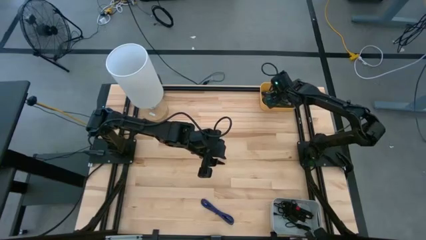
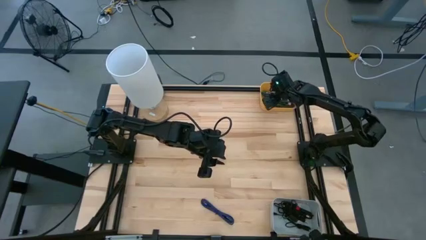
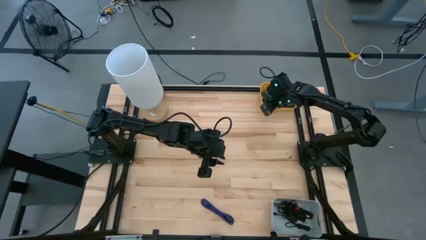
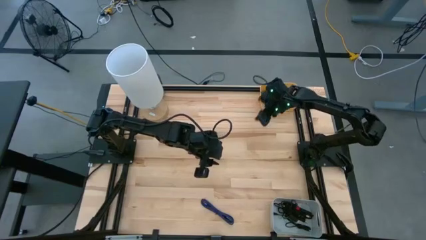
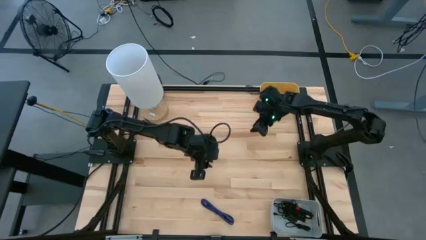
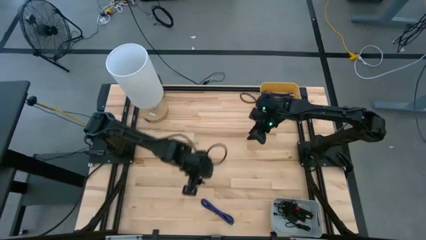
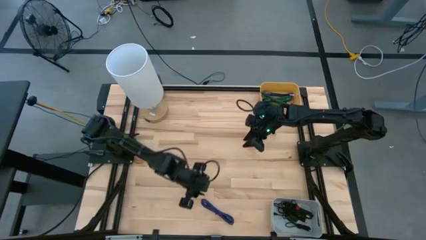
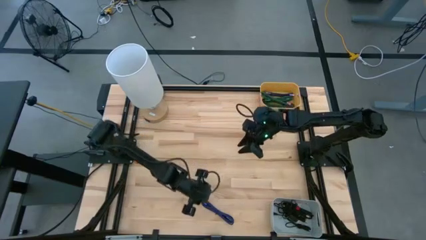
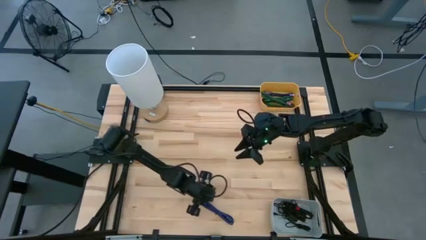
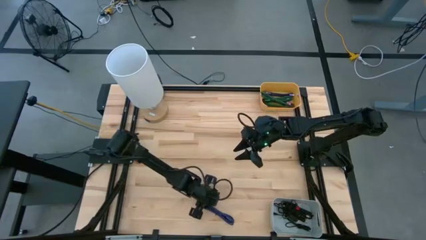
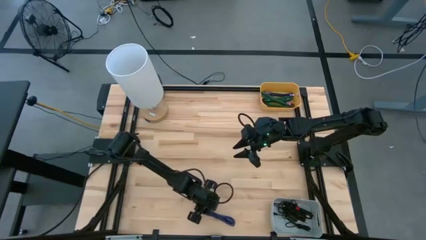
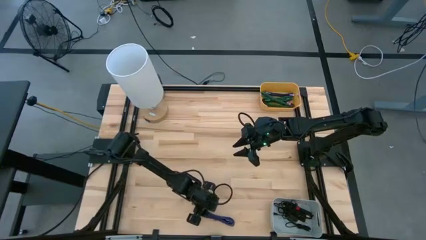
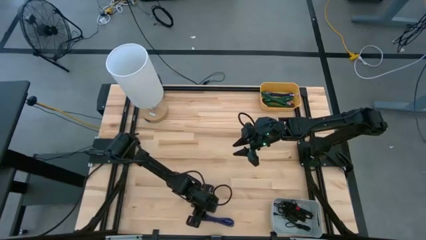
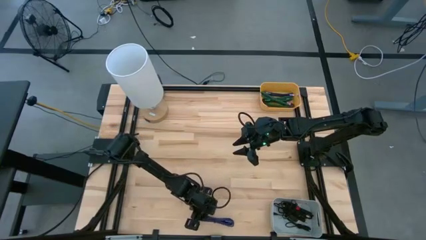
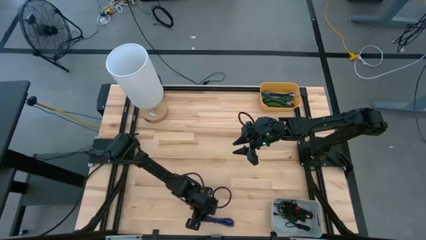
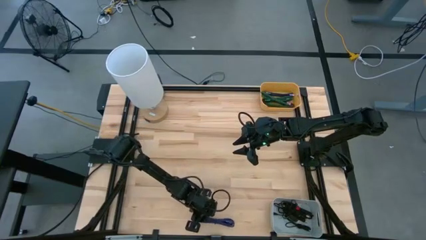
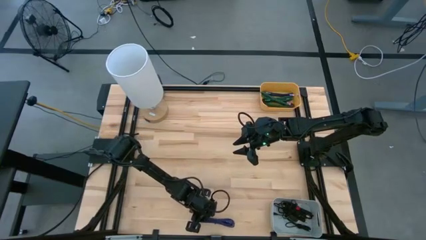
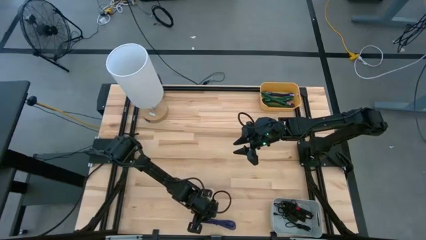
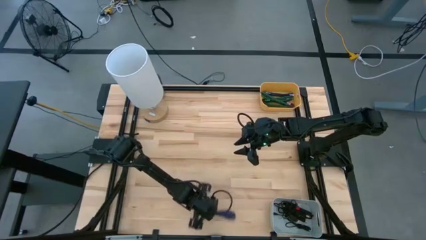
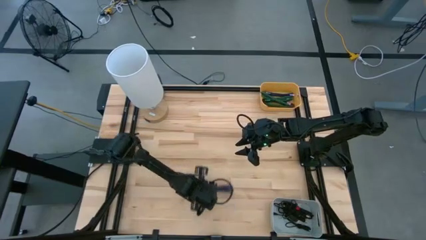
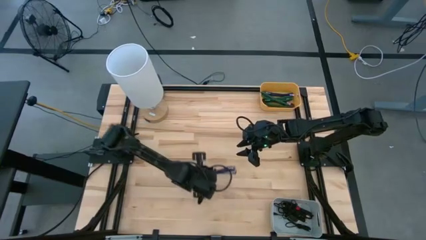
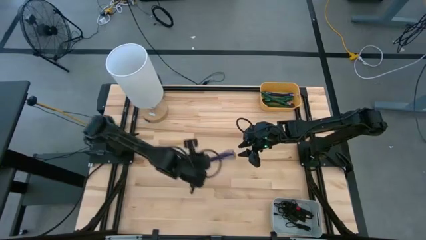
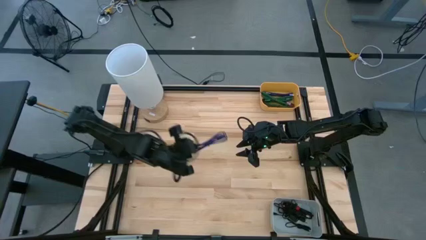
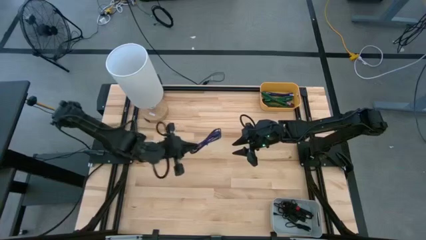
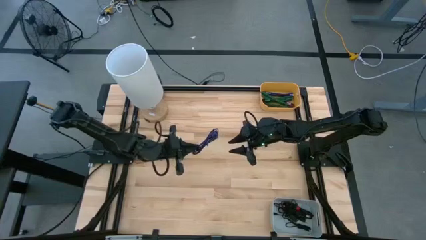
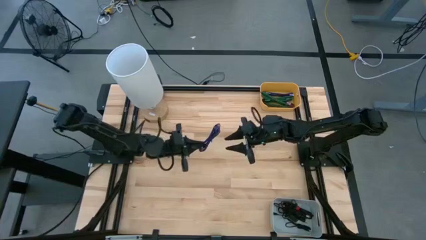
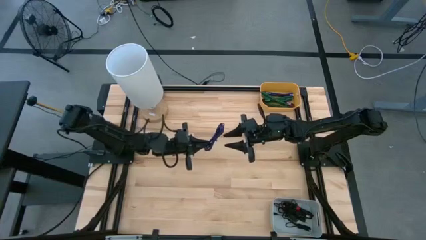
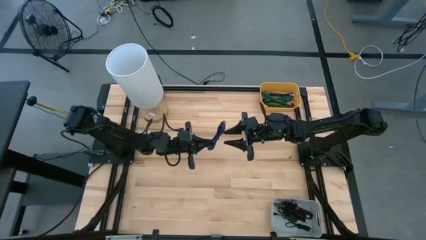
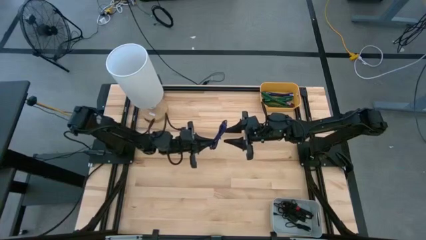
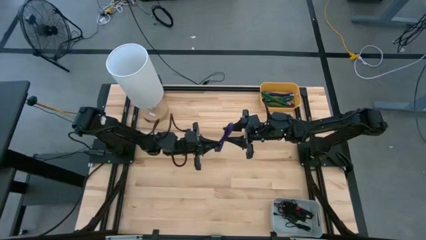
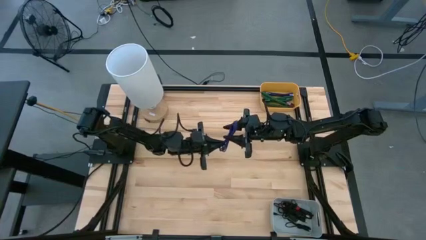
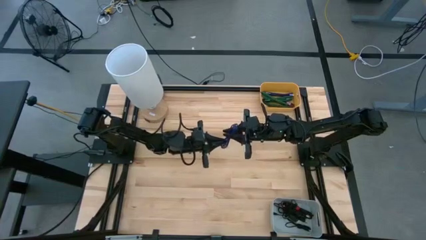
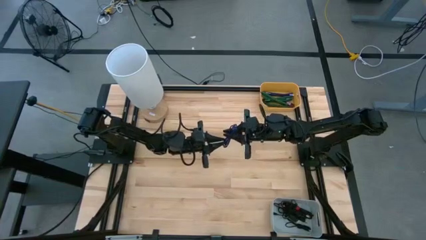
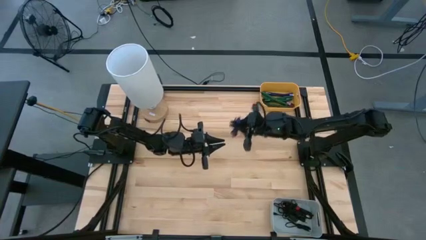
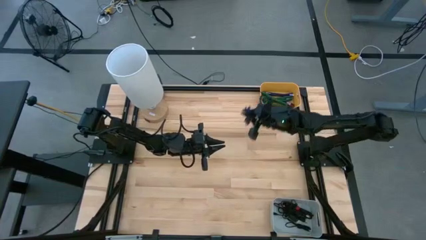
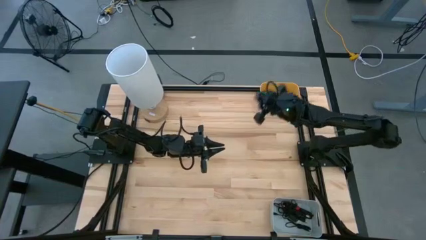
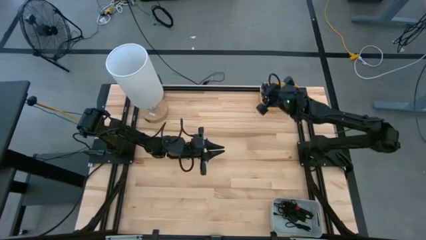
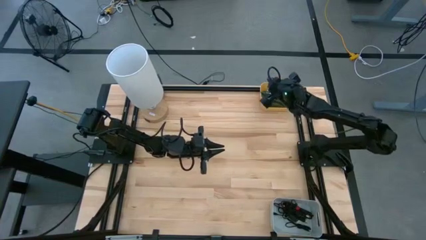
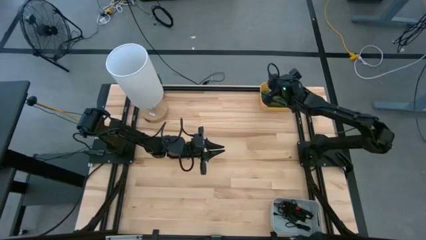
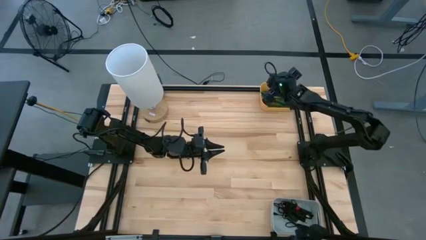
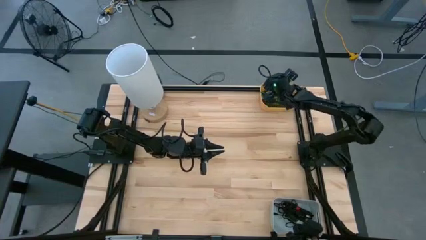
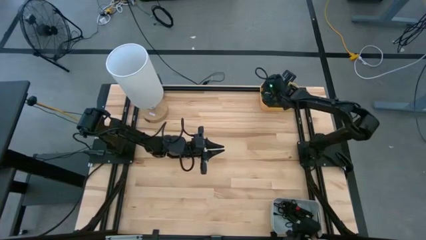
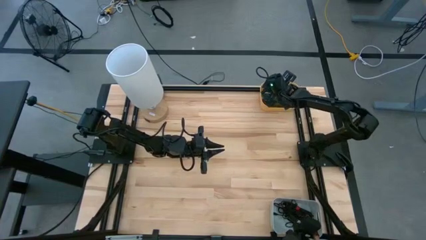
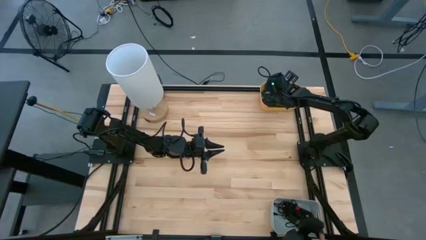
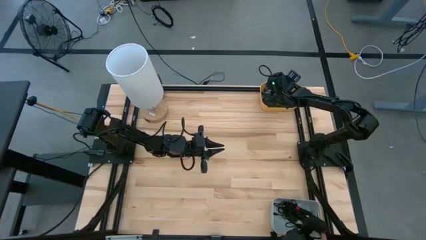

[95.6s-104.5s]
Task: Pick & Place USB Port
Put the black and blue USB cable into the yellow bin

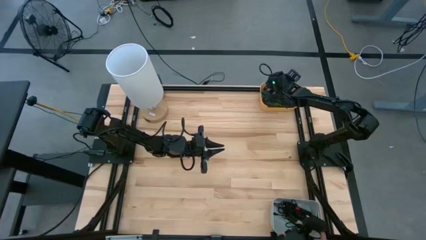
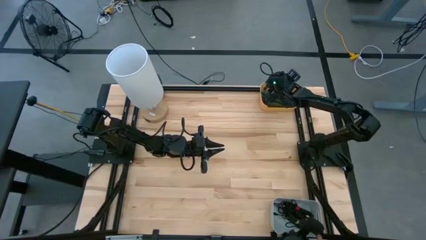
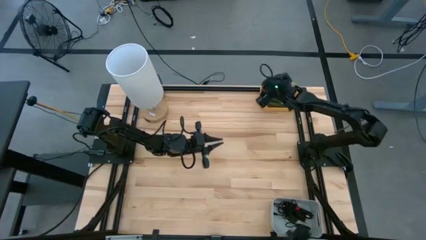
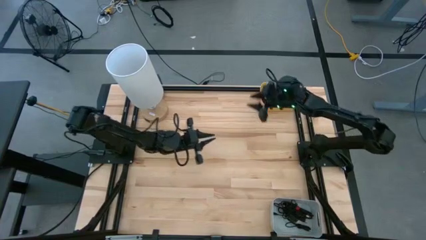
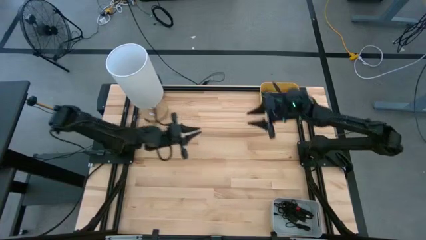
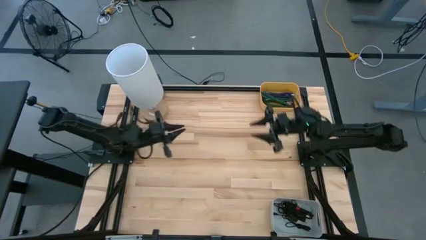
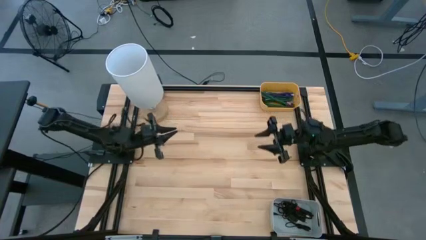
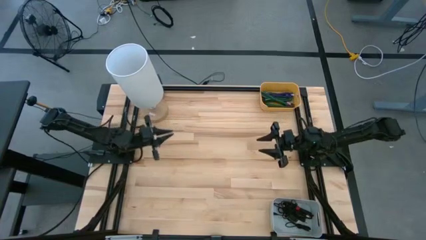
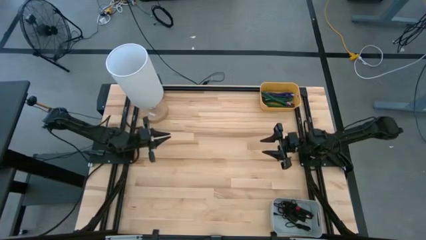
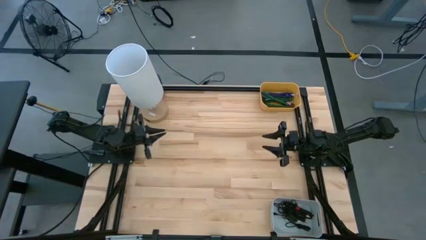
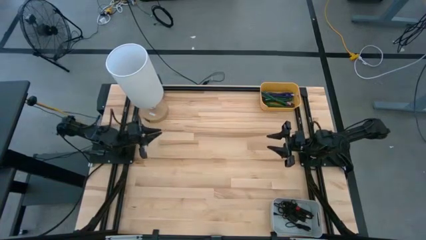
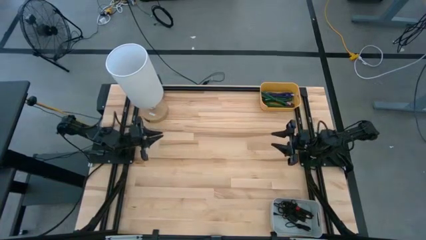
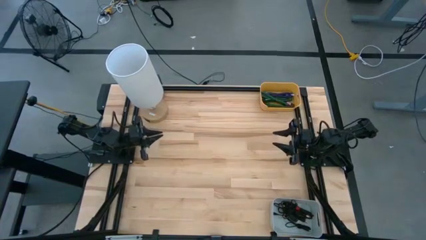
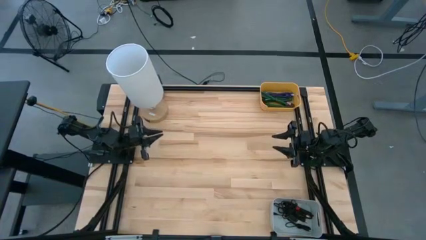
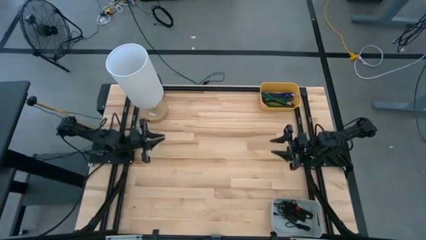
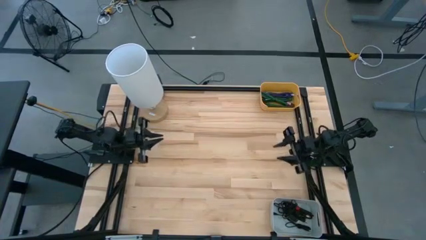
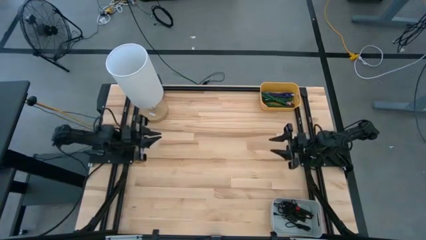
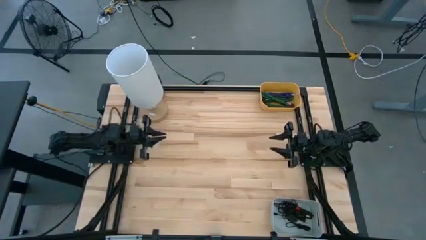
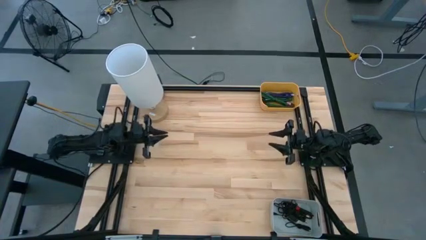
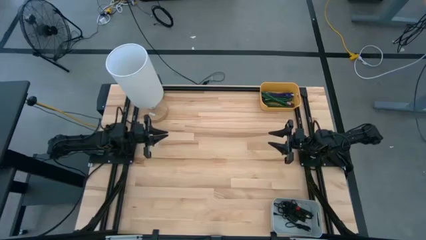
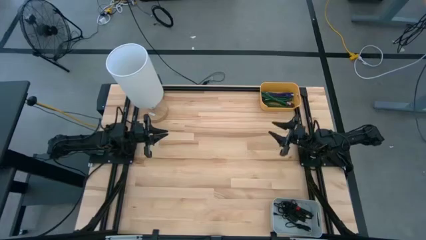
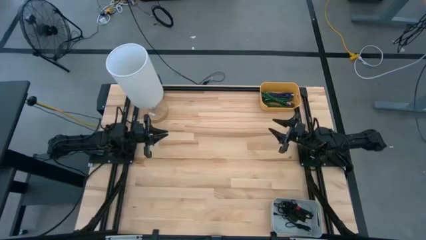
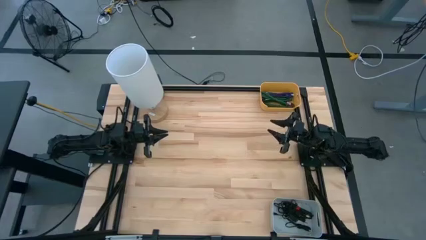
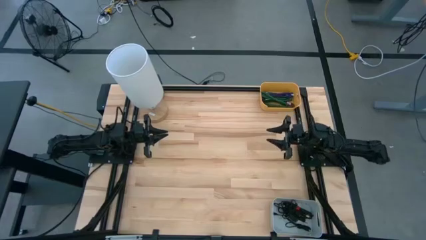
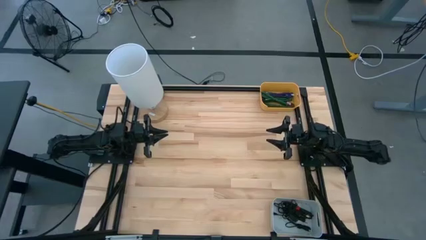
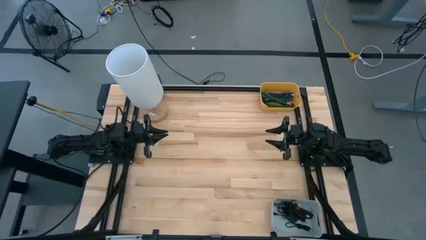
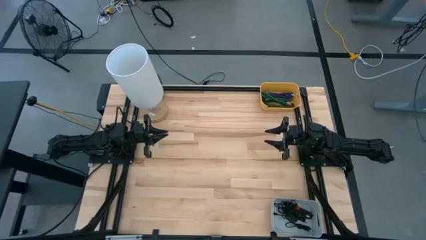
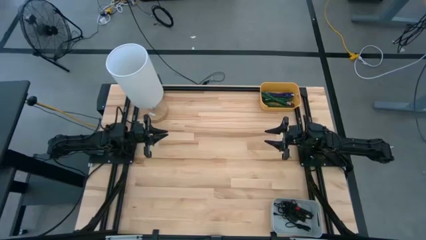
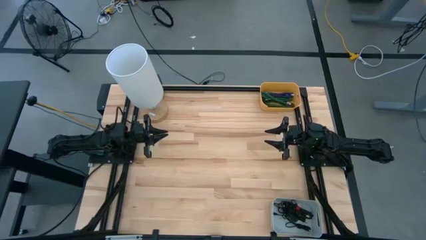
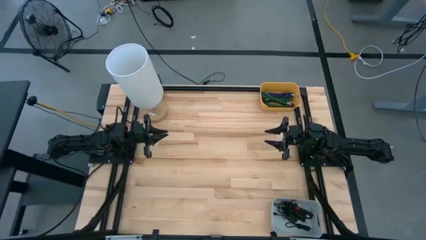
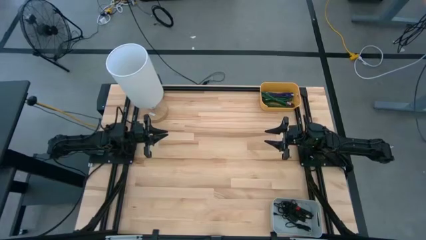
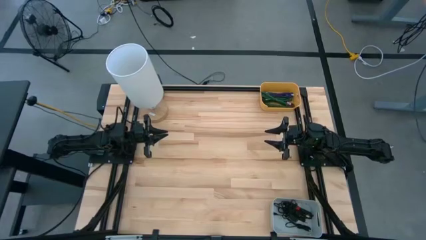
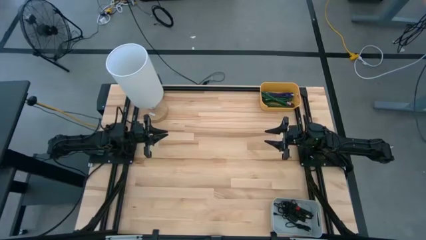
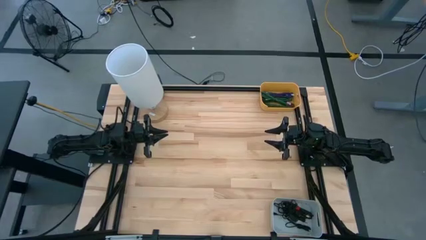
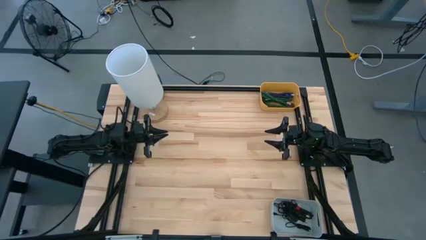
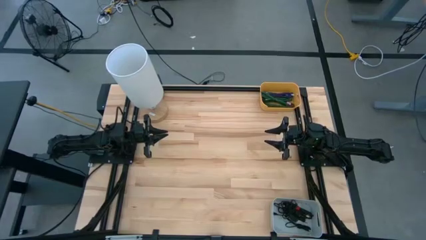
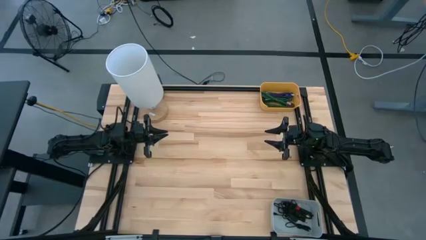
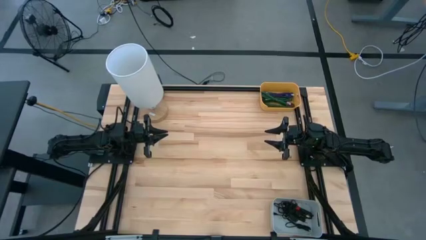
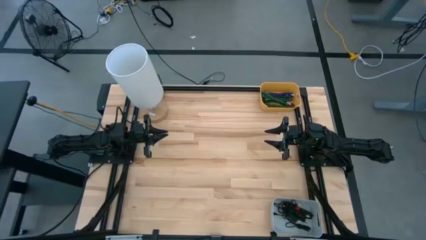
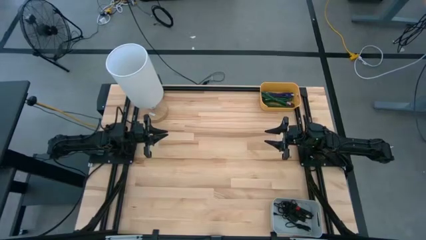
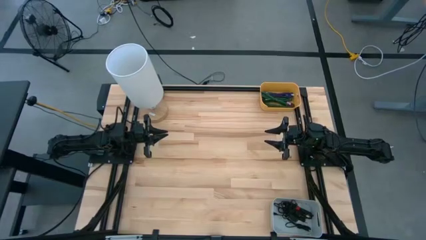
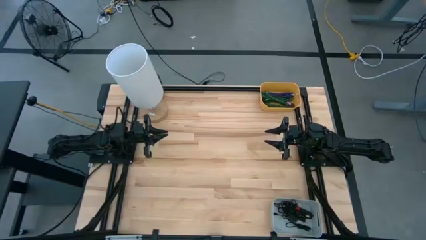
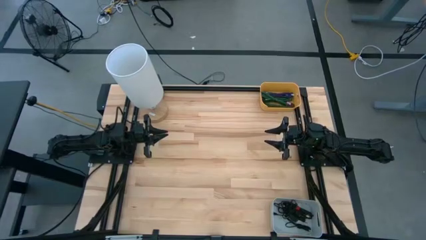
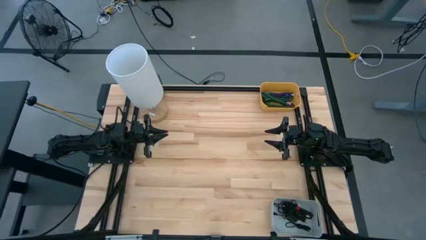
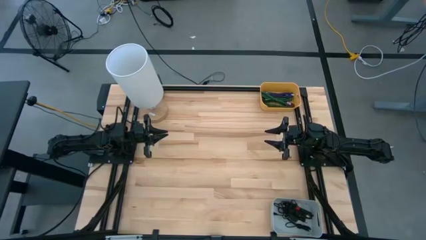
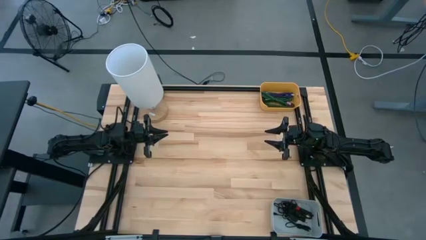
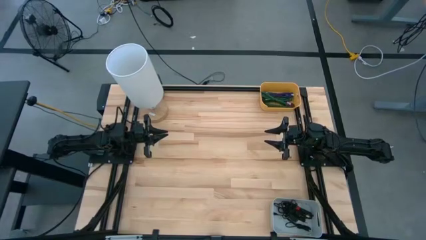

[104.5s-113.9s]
Return to Home Position
